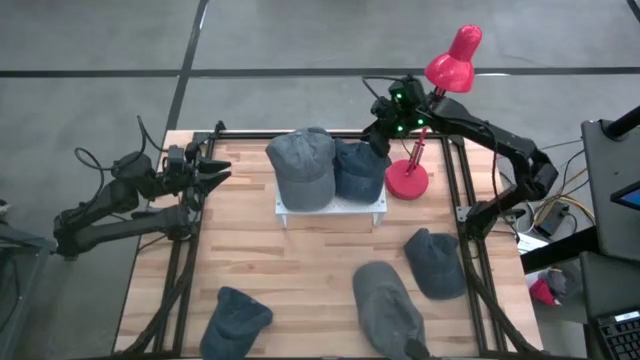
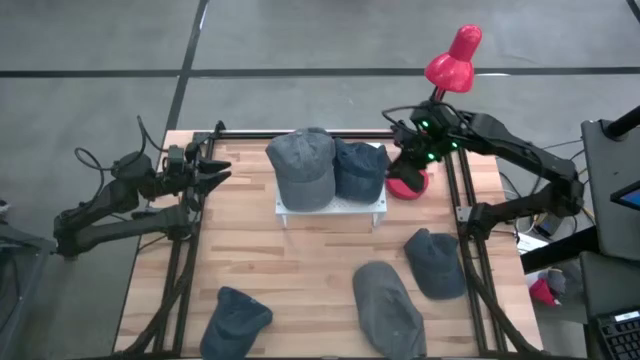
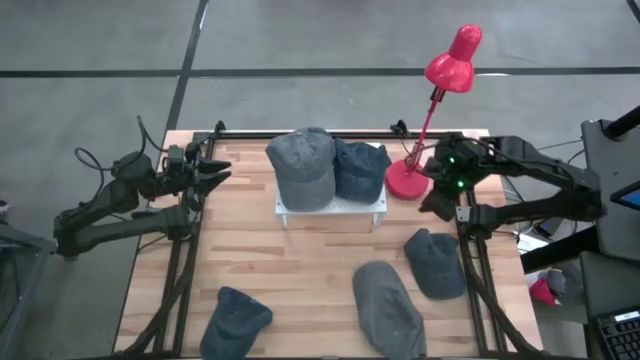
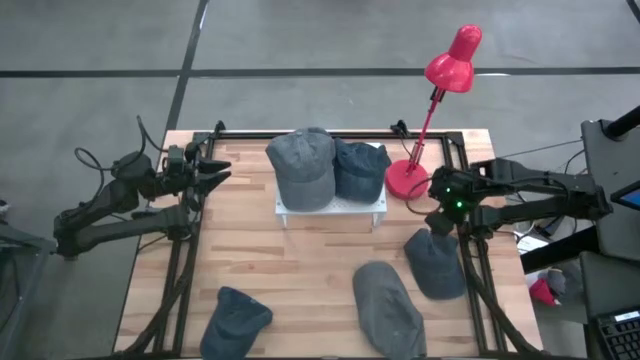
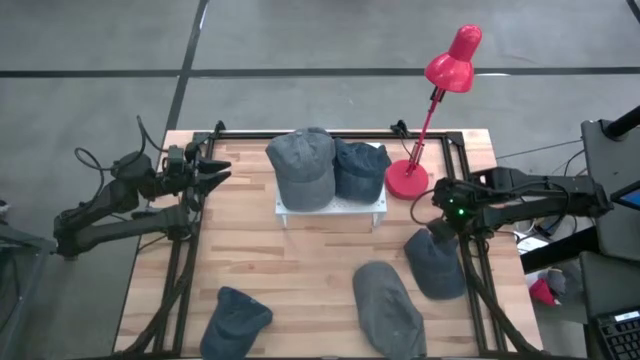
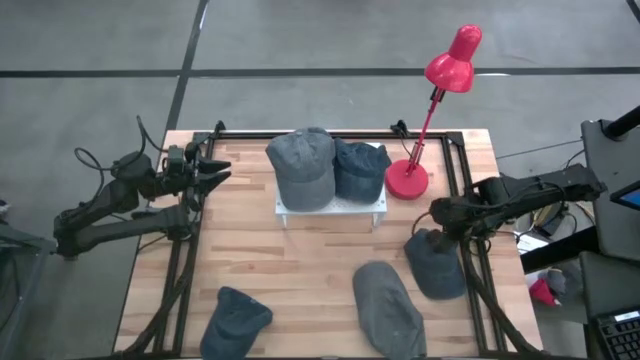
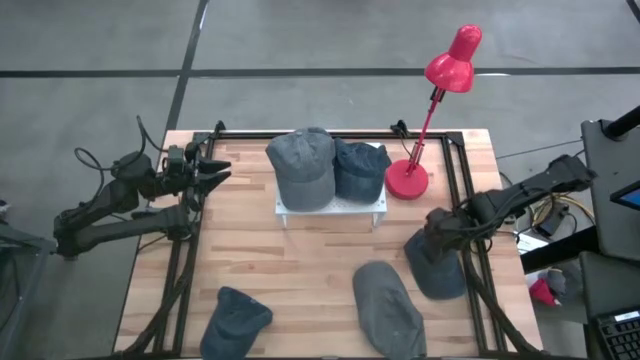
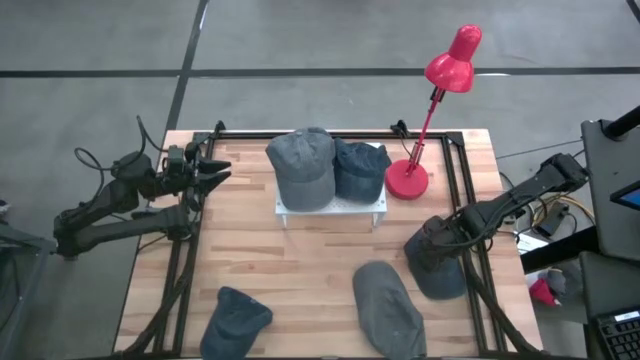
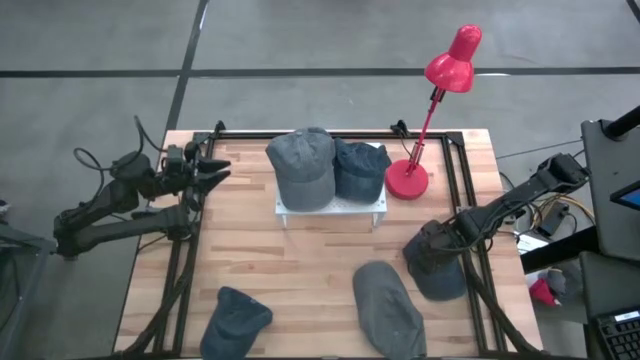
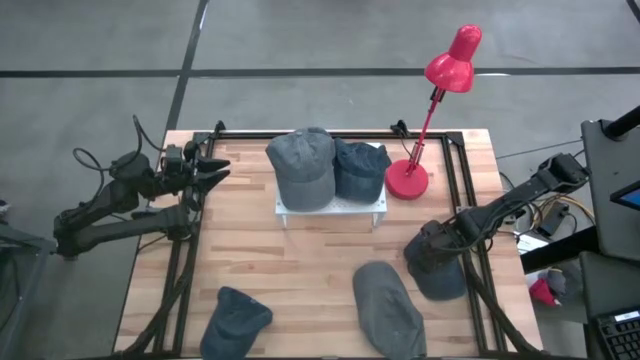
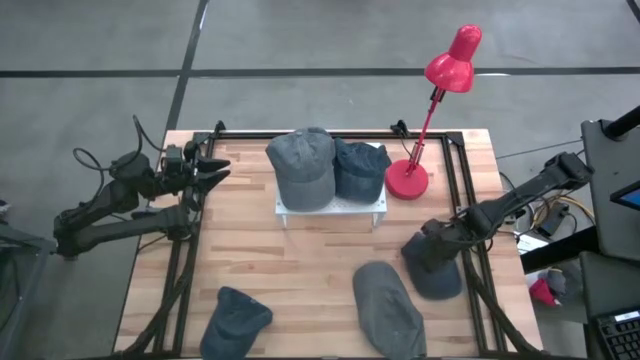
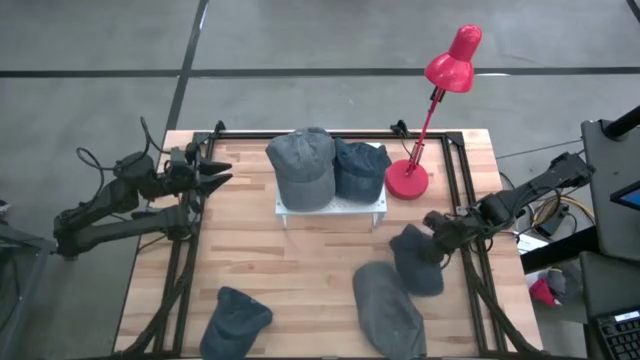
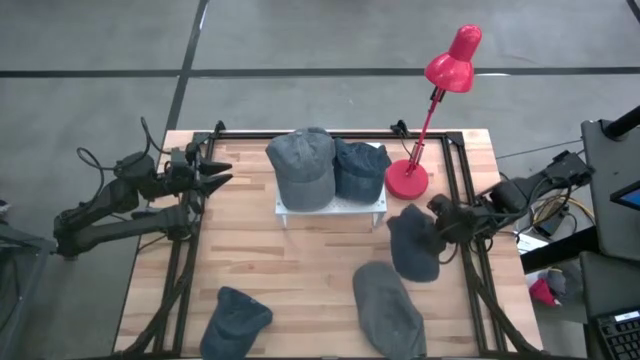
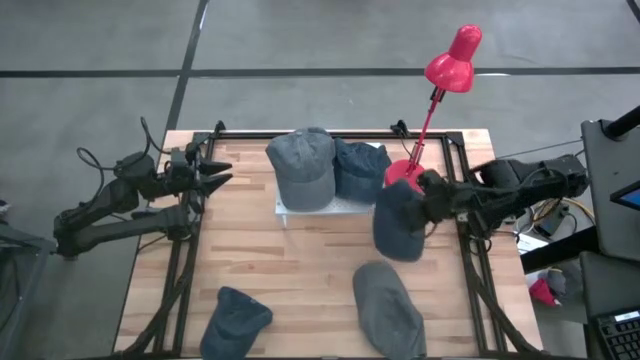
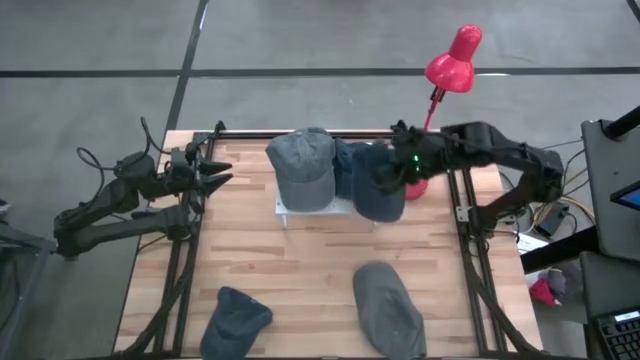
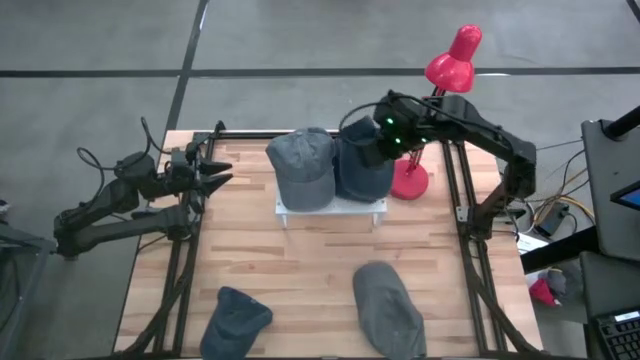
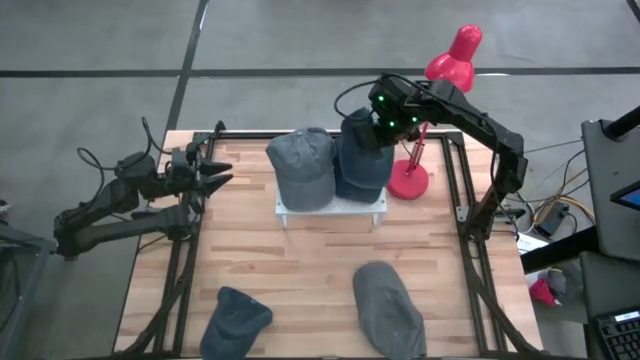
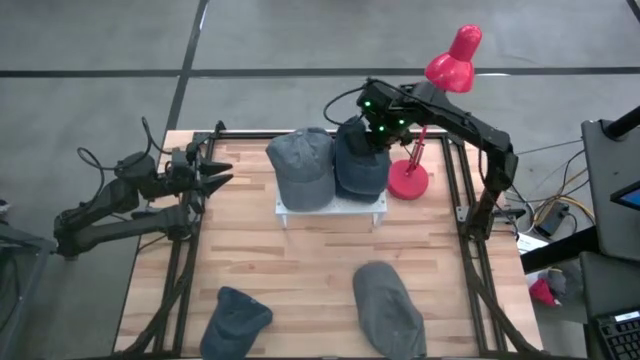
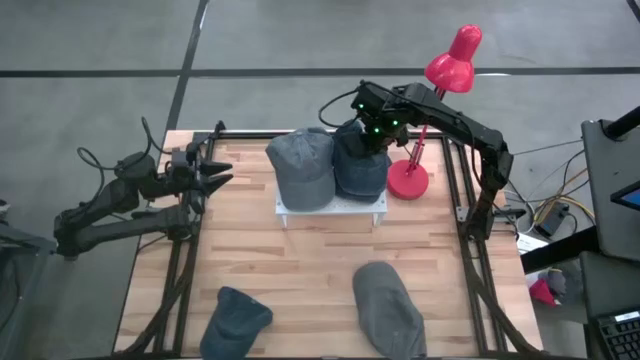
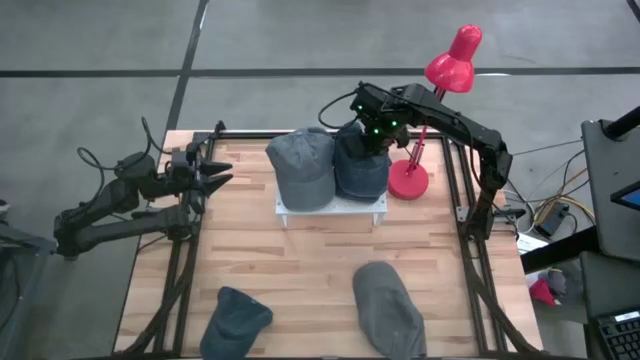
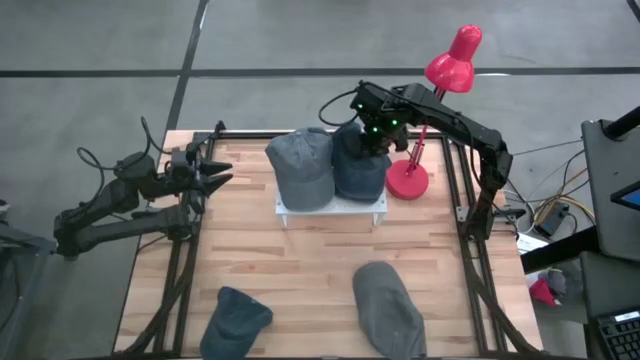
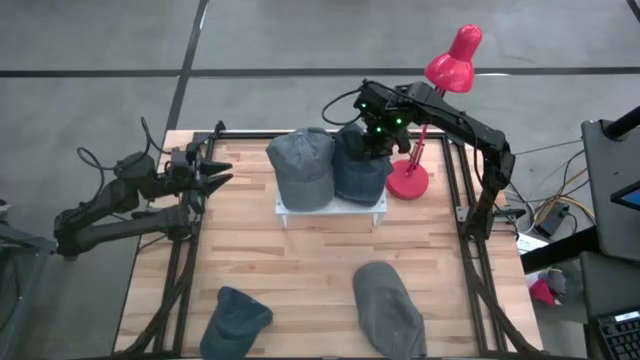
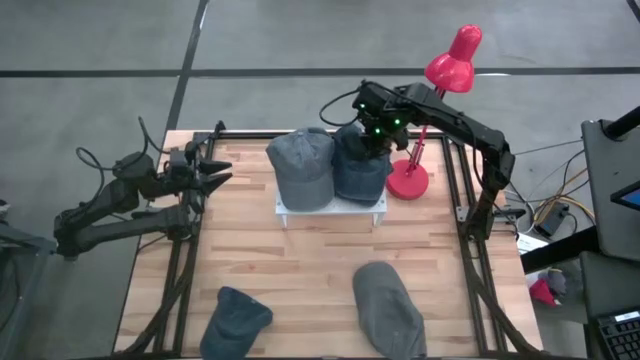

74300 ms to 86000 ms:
Task: Pick & Place hat
Stack the right blue cap on the blue cap on the shelf

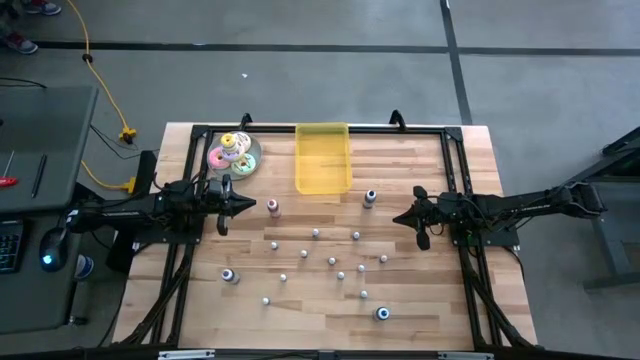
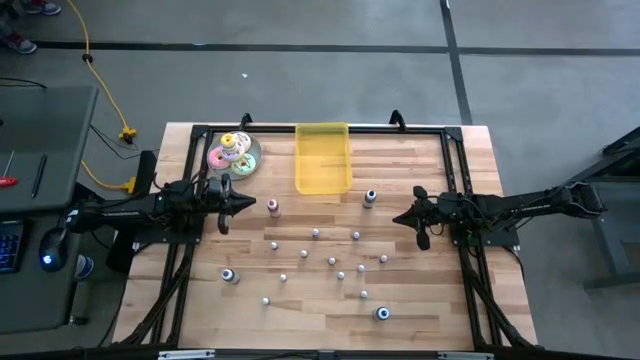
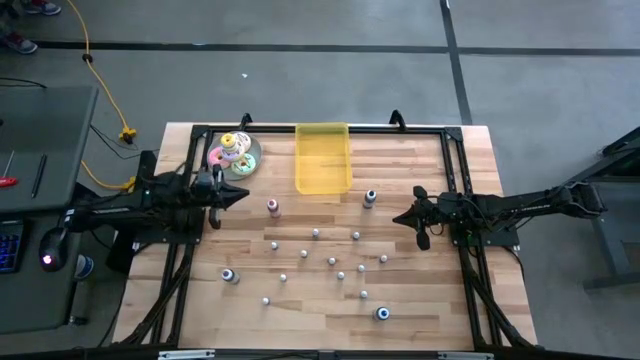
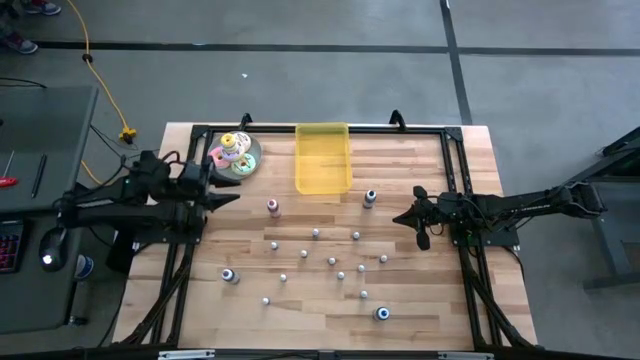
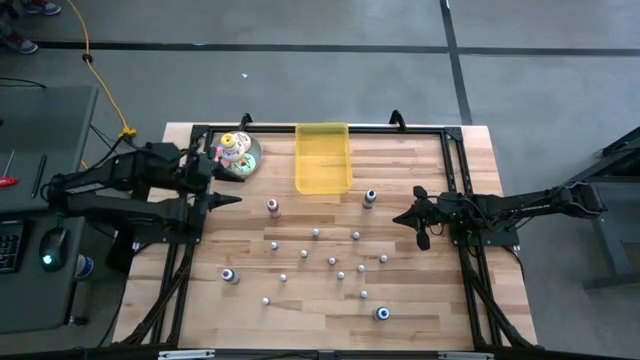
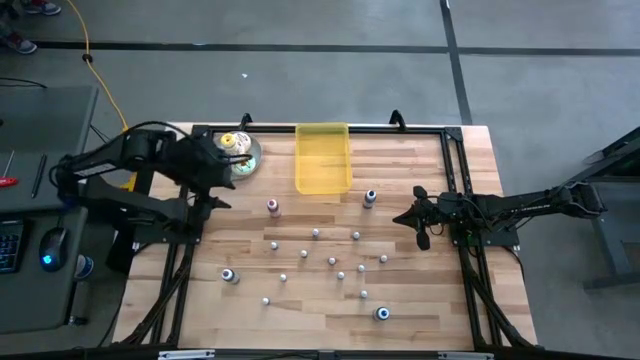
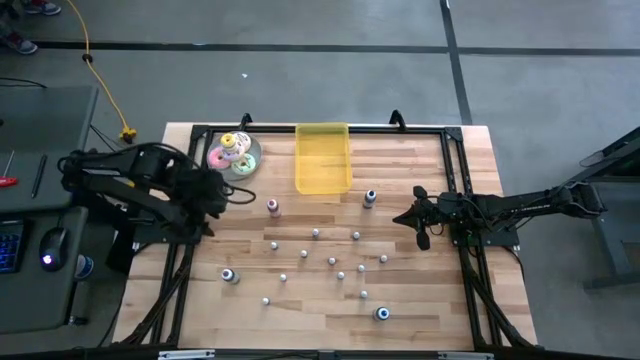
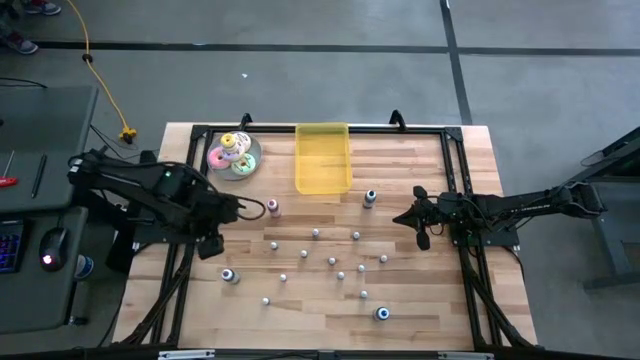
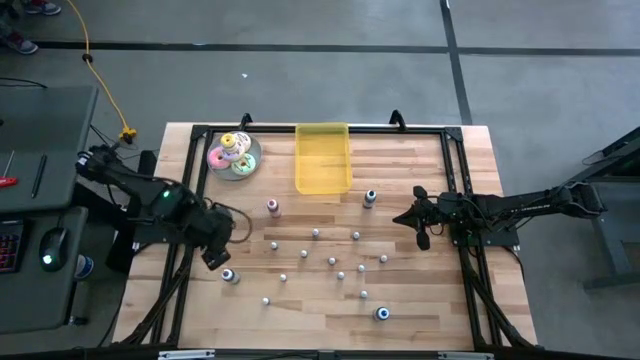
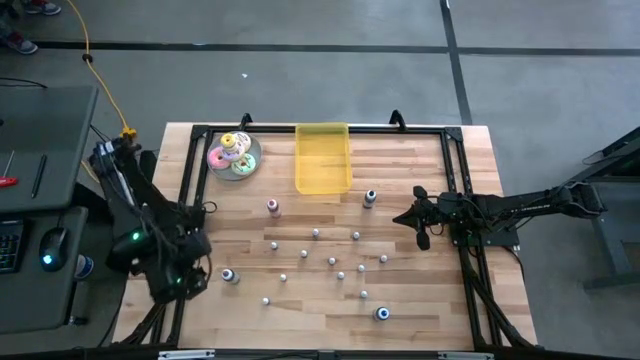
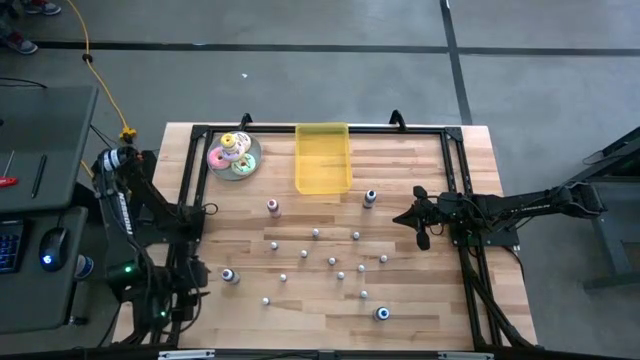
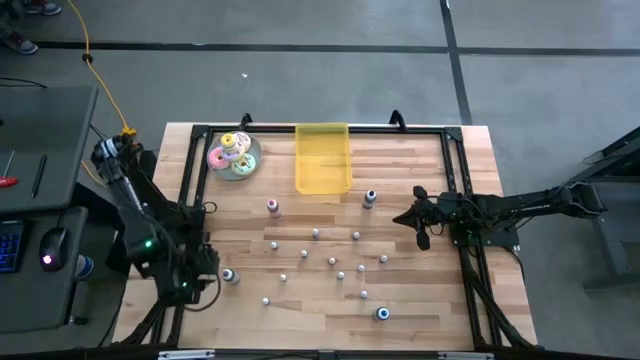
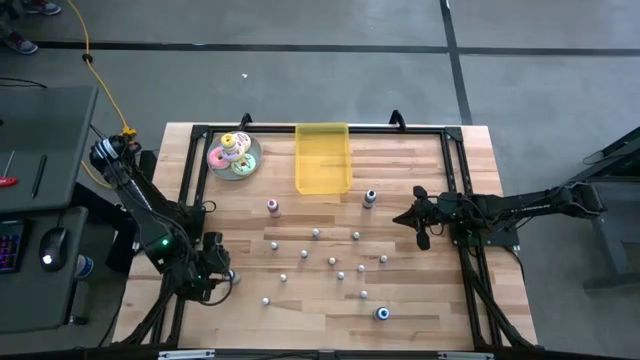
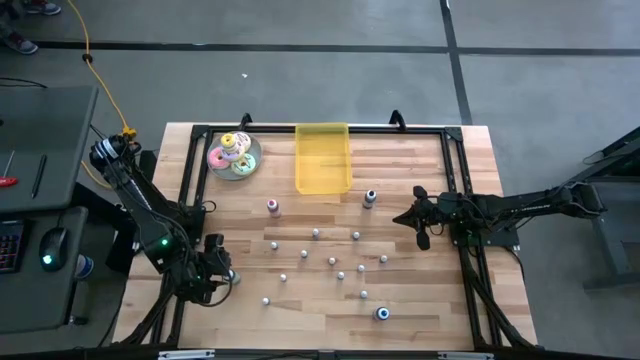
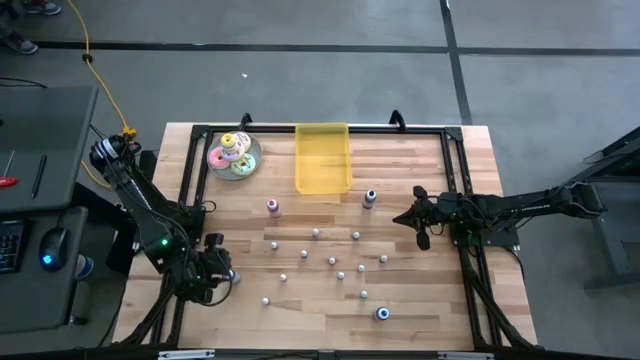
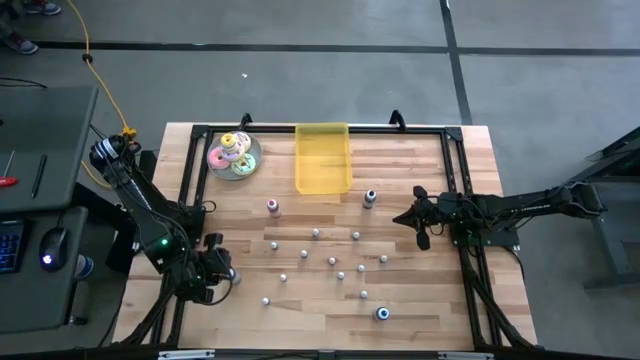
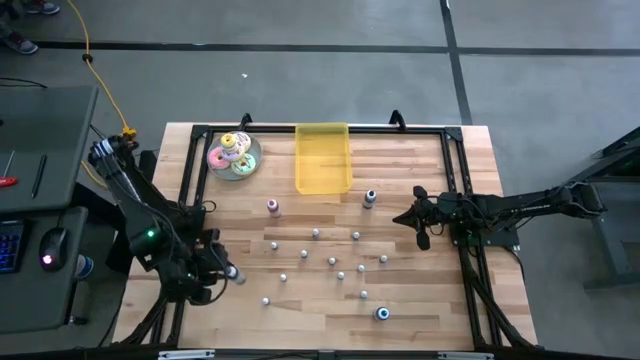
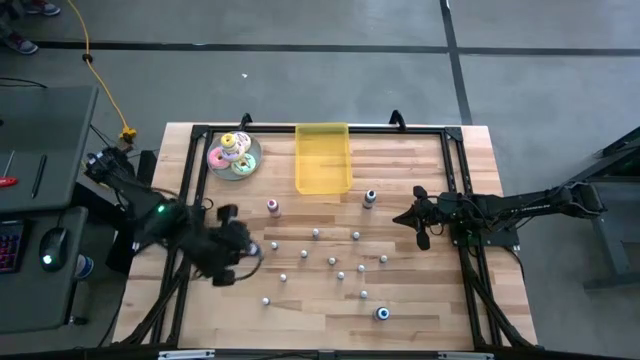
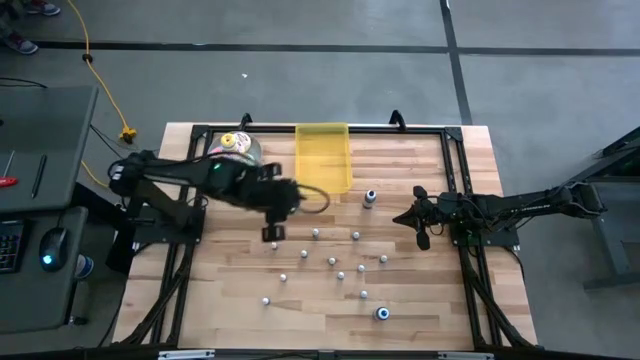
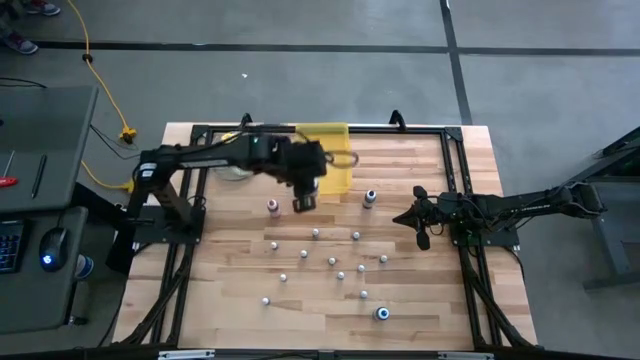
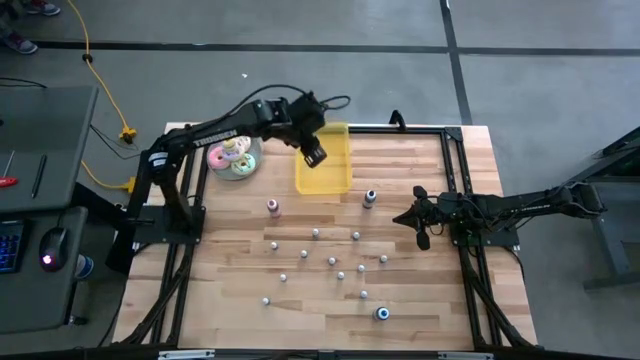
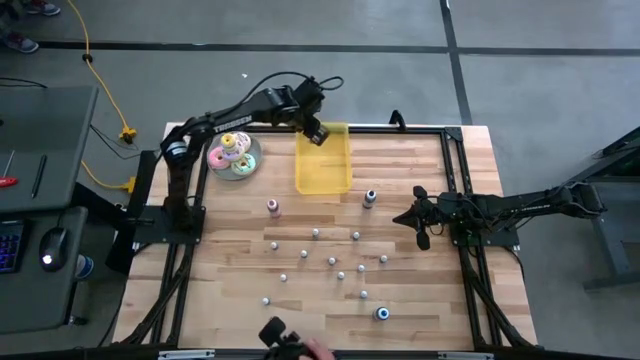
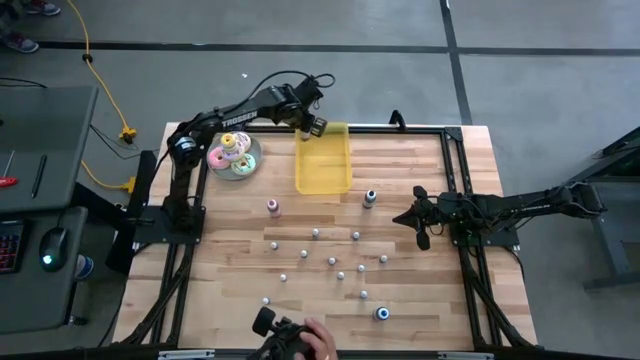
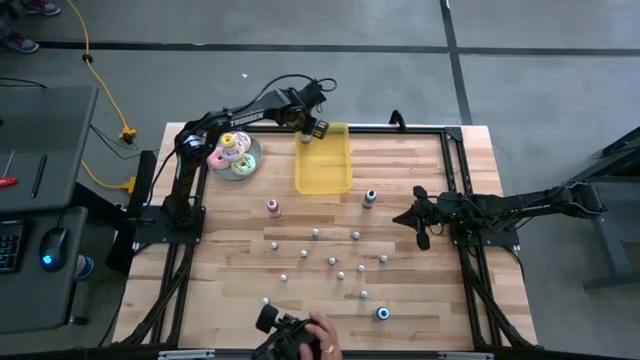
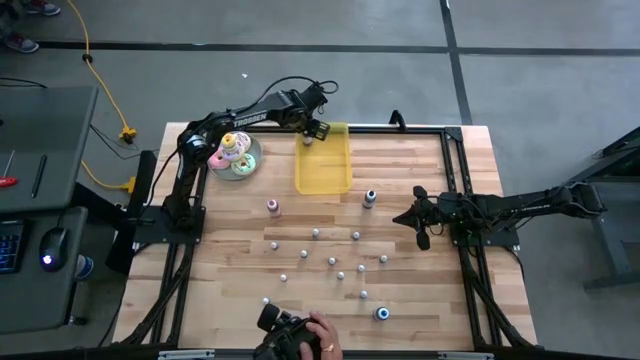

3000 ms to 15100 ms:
Task: Pick & Place food coloring
Put the large purple food coloring bottle into the yellow bin
